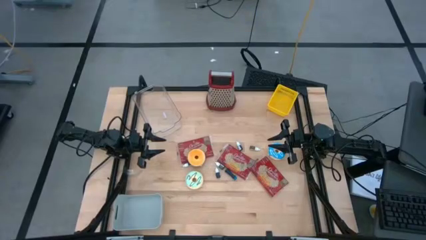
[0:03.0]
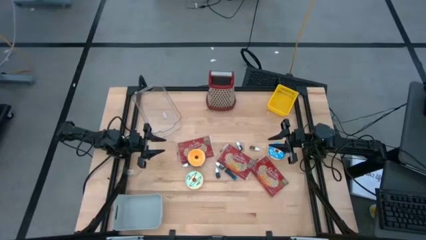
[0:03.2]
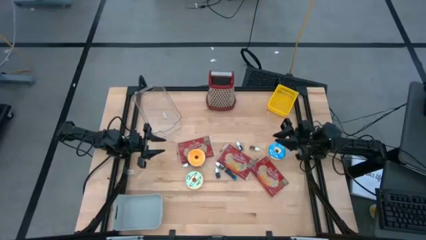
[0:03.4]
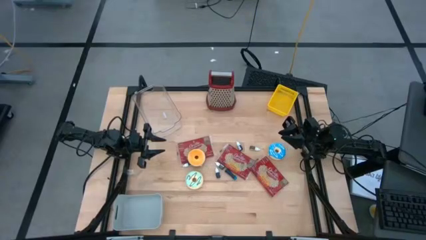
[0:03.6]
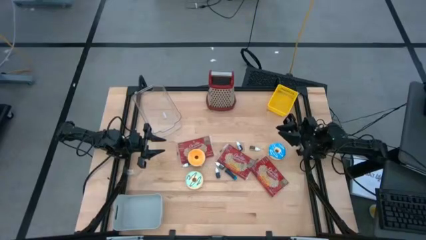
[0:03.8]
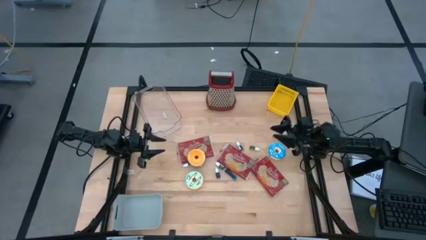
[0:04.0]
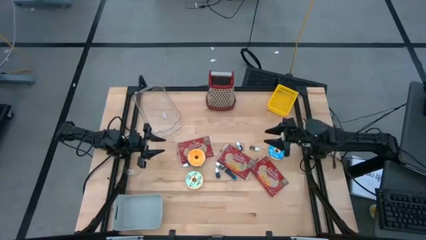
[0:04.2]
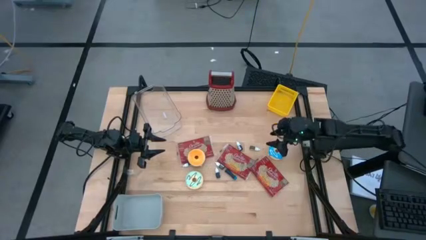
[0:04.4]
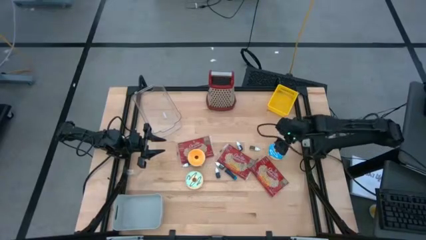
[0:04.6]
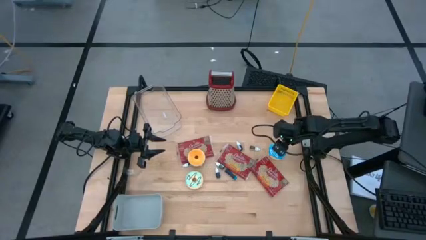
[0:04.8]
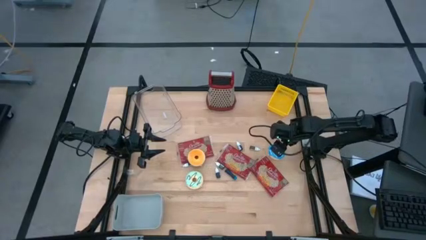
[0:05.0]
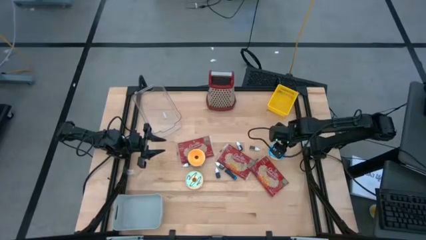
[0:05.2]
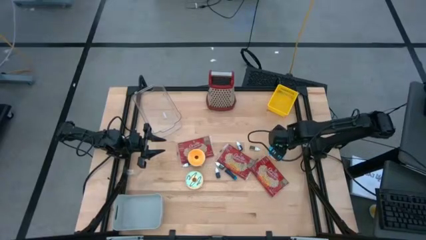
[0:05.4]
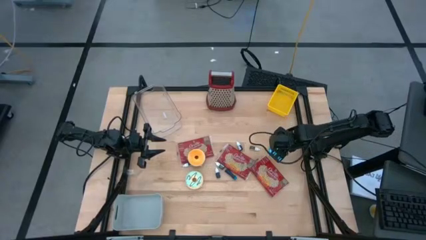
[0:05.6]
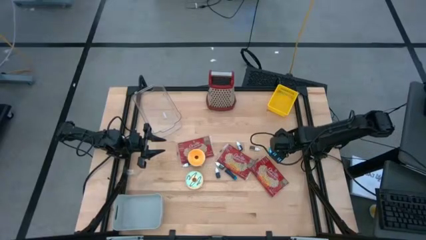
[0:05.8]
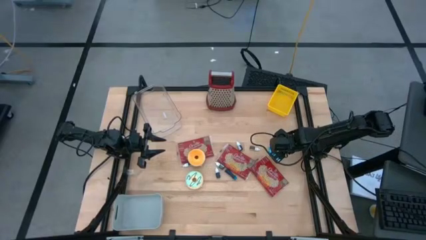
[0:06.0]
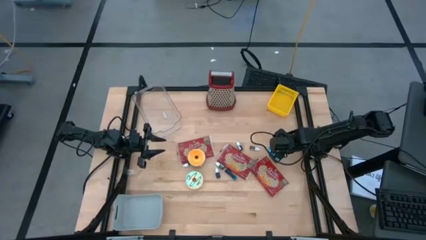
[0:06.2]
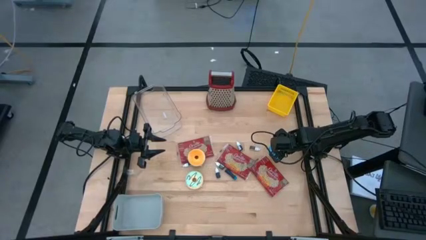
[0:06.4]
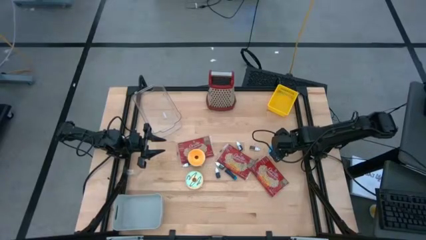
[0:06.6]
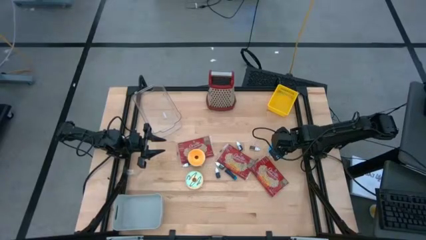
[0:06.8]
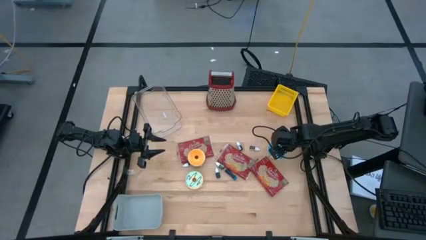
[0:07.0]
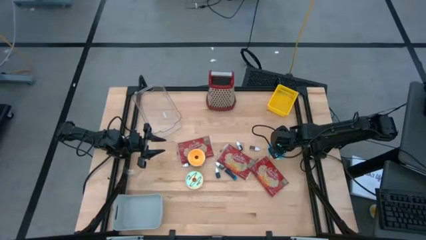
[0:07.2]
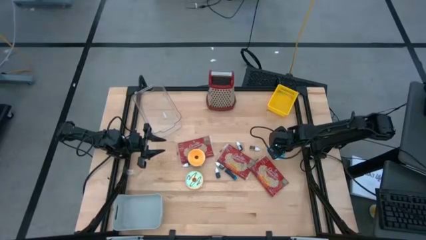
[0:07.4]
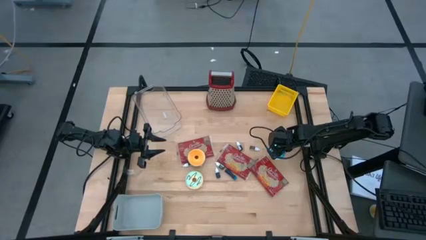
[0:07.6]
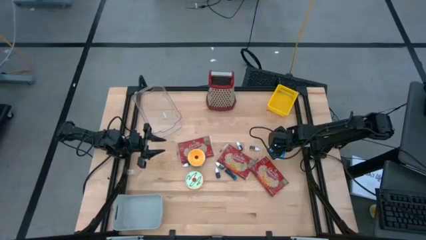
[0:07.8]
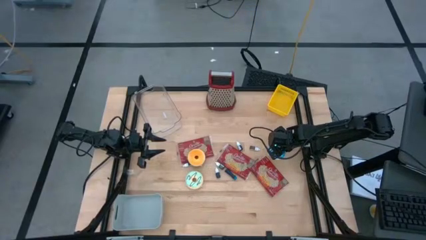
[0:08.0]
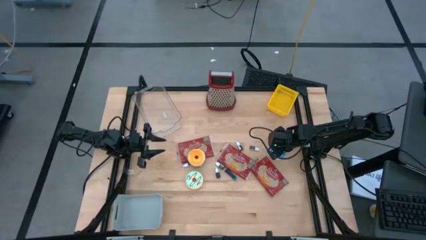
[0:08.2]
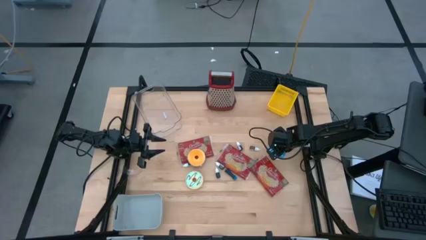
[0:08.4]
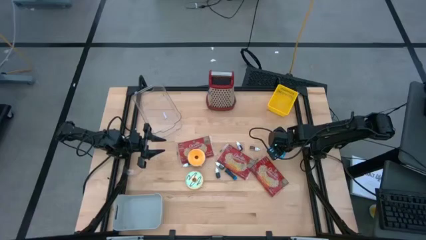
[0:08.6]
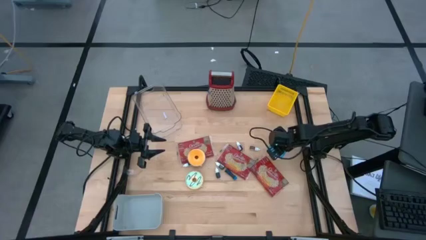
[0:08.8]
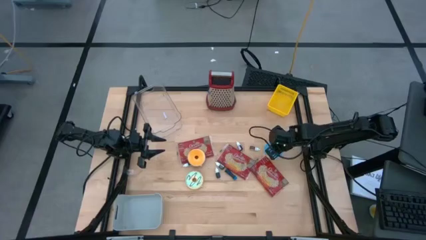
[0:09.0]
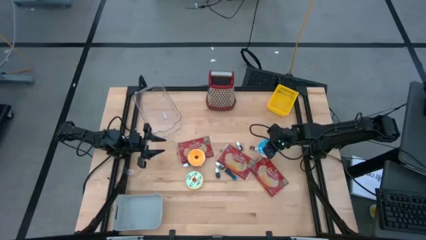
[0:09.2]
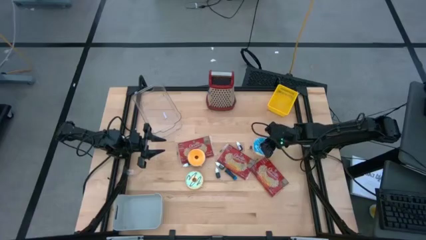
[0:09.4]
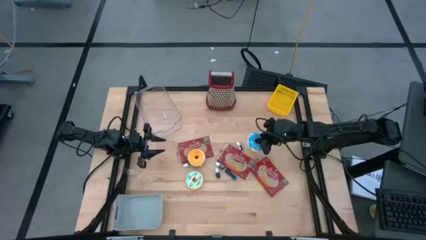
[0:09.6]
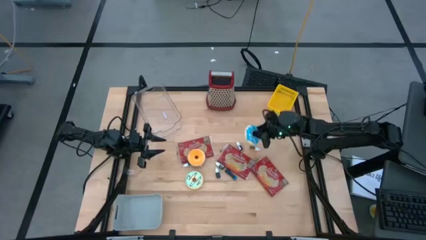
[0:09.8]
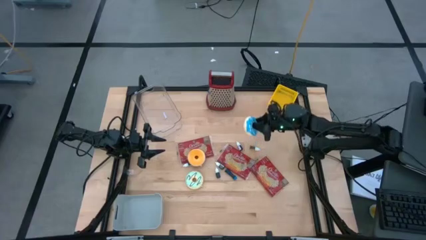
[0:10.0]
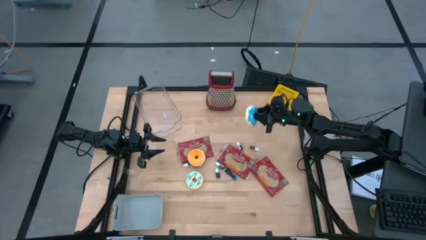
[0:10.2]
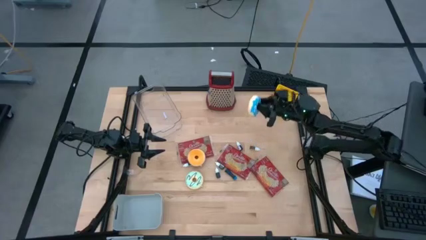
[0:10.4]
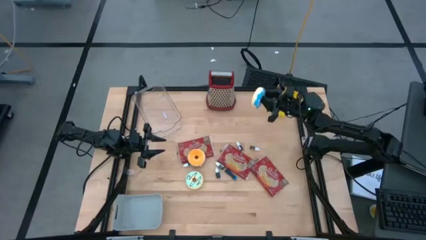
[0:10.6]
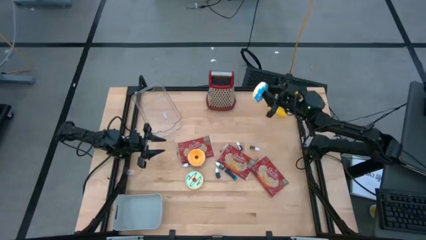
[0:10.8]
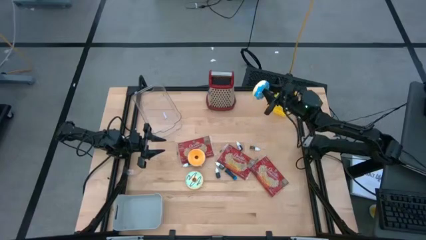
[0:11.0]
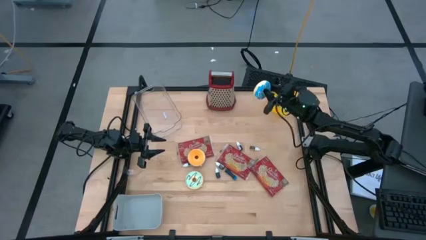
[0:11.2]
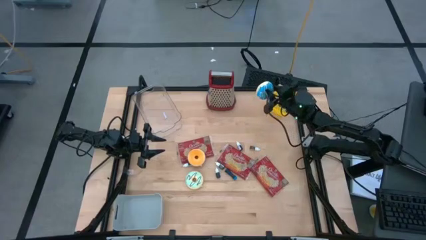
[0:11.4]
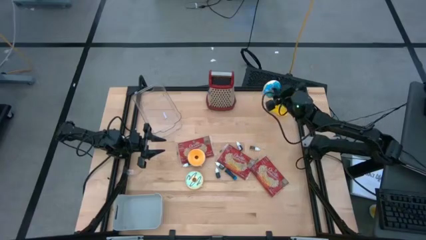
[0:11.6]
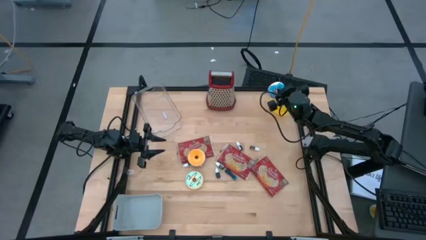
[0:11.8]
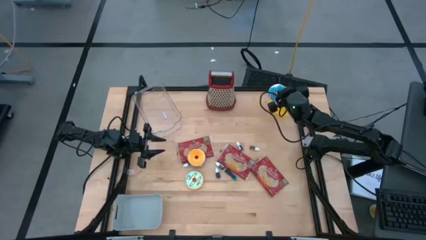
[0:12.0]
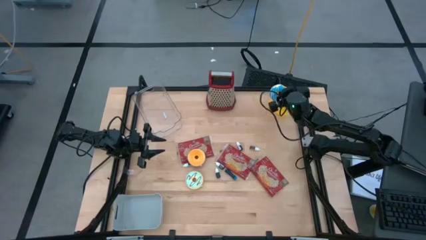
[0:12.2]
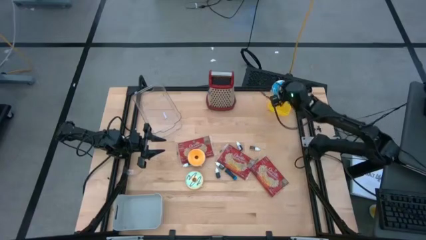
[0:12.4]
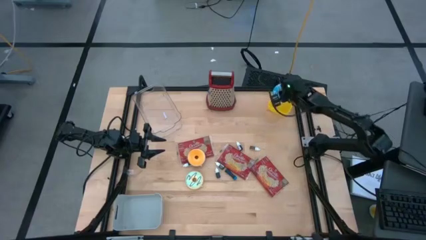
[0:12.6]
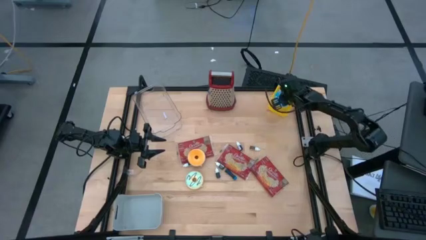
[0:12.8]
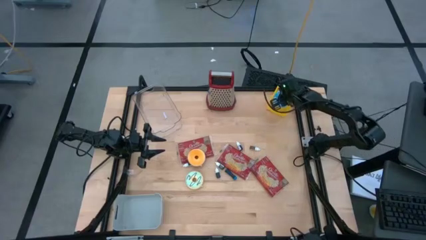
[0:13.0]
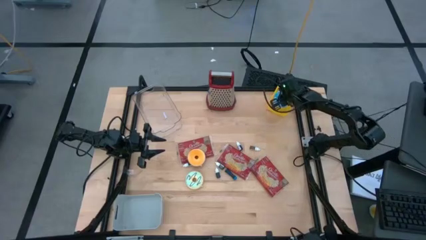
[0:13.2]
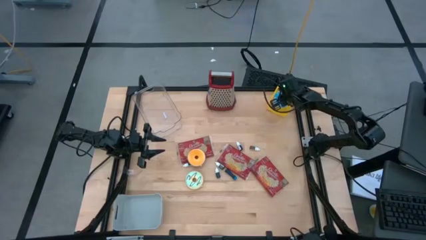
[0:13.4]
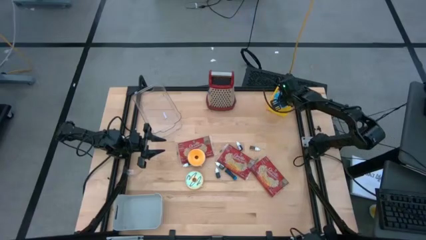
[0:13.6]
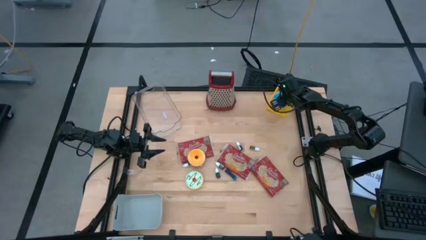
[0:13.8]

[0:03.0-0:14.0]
Put the blue donut into the yellow bin

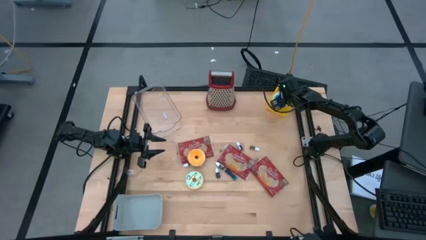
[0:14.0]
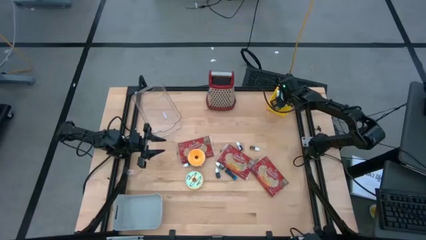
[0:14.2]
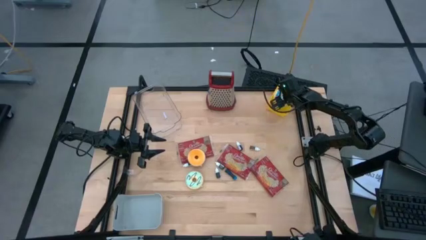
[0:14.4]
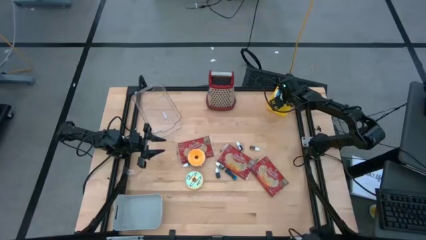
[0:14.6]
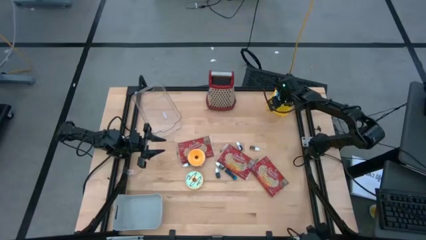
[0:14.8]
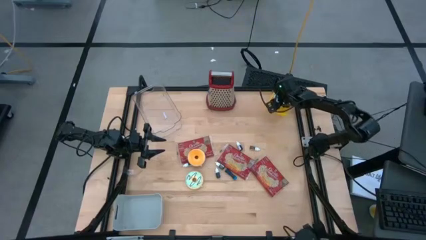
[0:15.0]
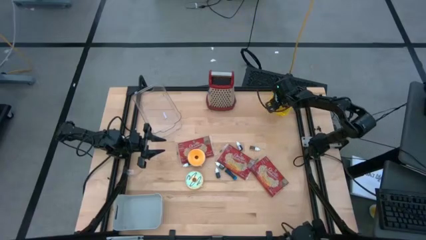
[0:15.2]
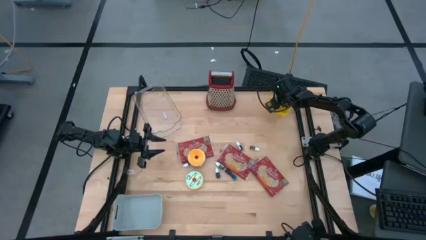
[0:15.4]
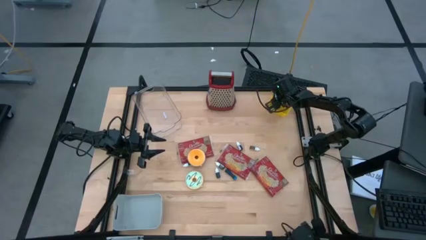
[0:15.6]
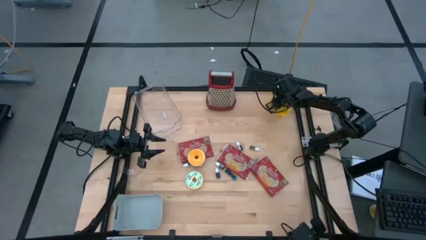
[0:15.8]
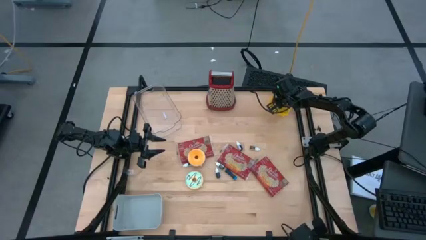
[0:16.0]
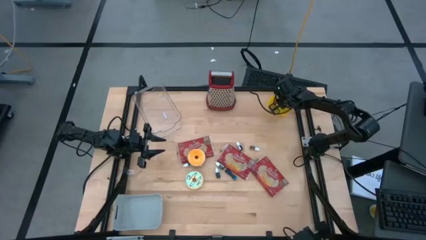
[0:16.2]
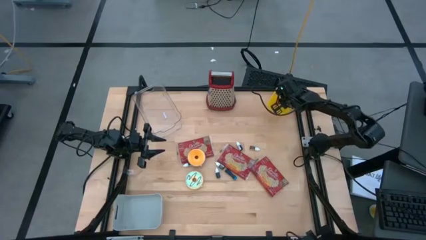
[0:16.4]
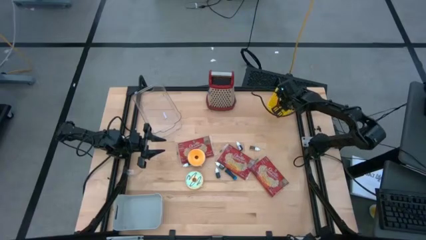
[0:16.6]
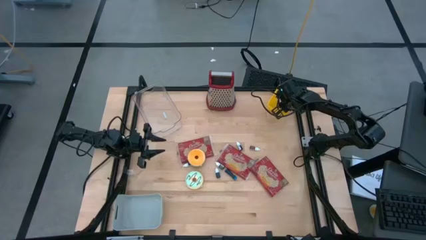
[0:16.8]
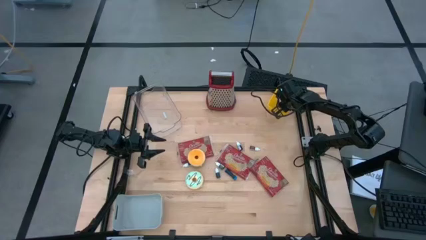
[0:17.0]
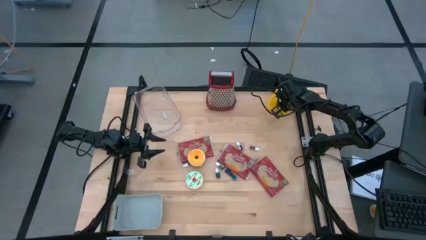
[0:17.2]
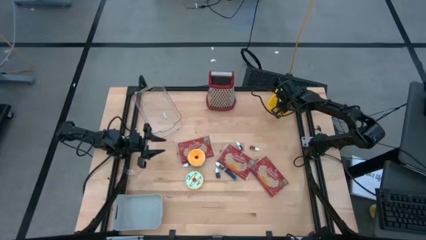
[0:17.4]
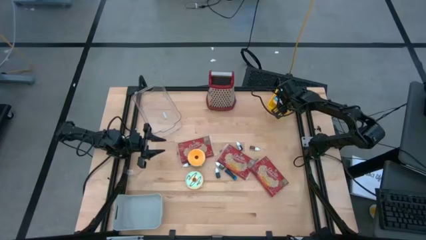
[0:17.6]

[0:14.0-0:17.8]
Adjust the blue donut in the yellow bin
